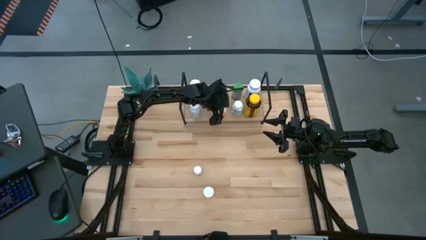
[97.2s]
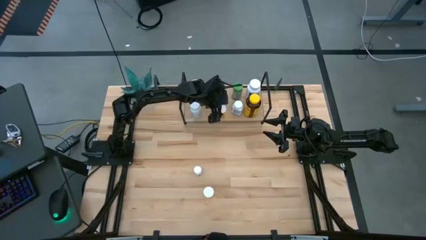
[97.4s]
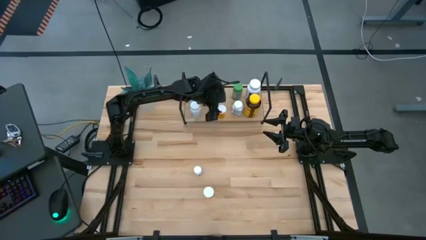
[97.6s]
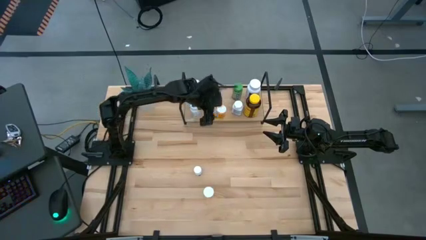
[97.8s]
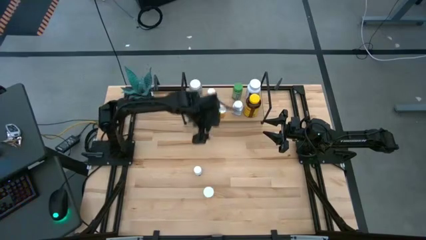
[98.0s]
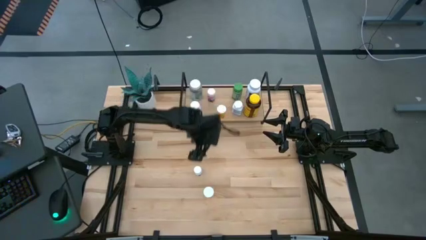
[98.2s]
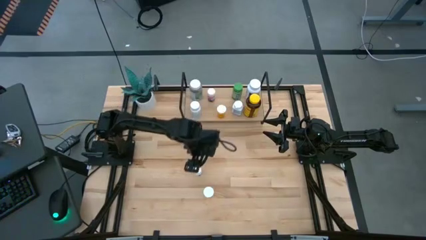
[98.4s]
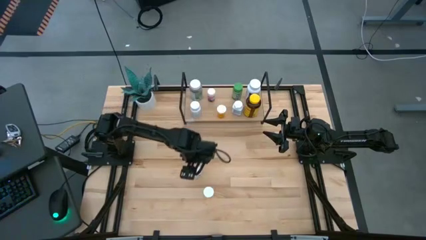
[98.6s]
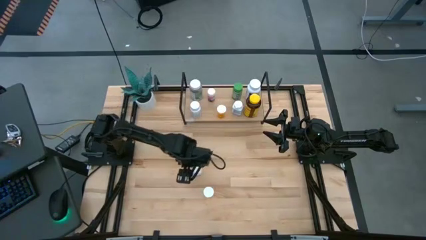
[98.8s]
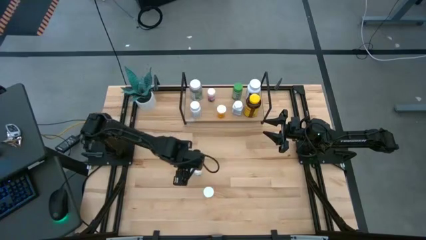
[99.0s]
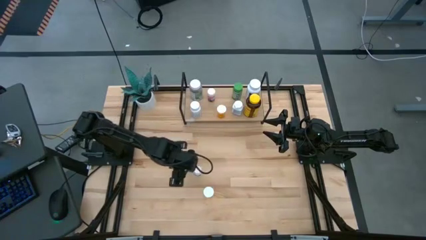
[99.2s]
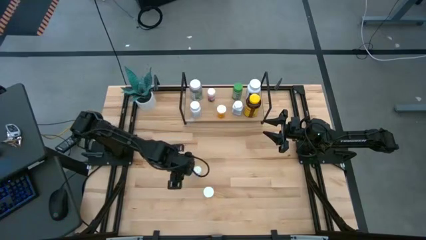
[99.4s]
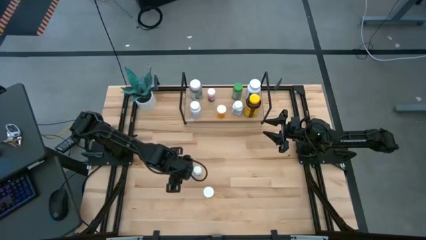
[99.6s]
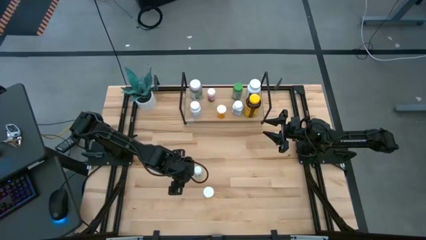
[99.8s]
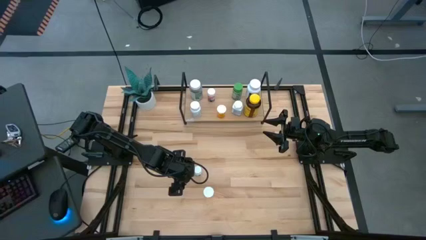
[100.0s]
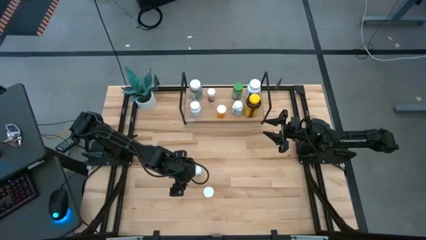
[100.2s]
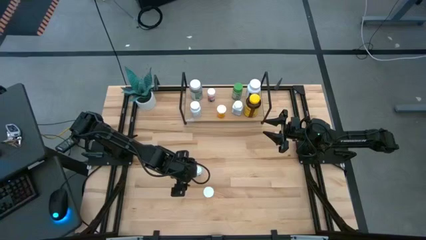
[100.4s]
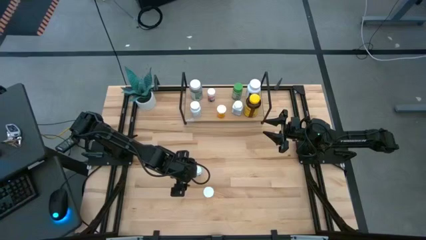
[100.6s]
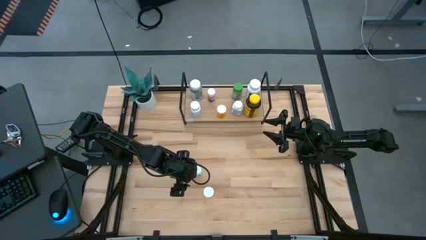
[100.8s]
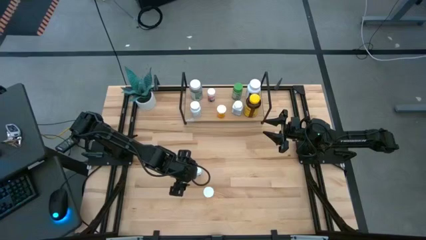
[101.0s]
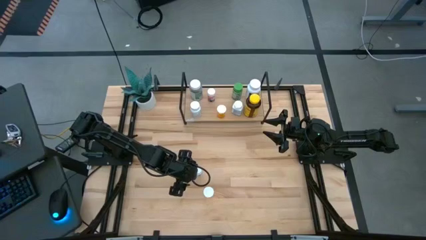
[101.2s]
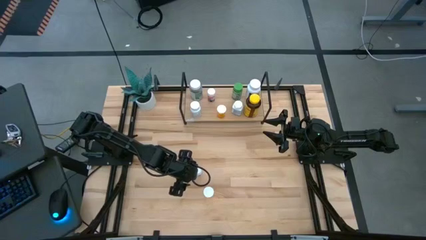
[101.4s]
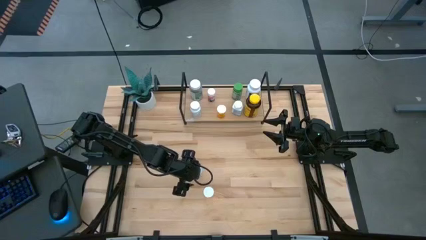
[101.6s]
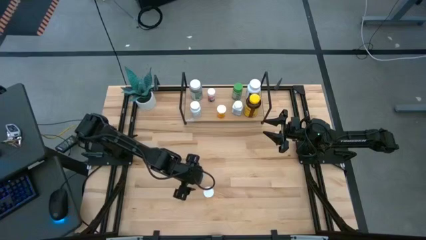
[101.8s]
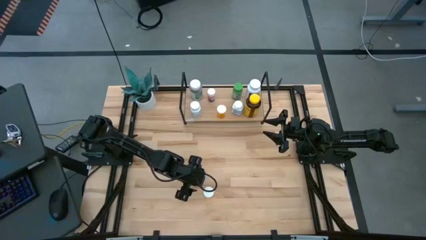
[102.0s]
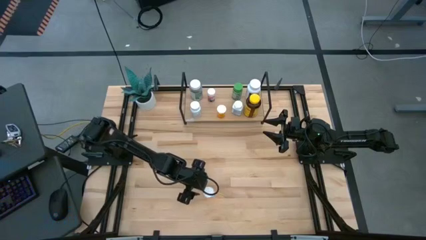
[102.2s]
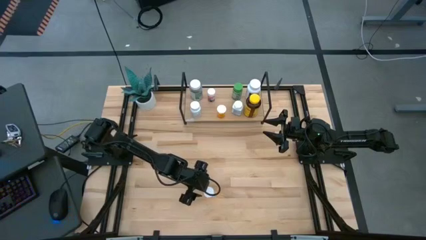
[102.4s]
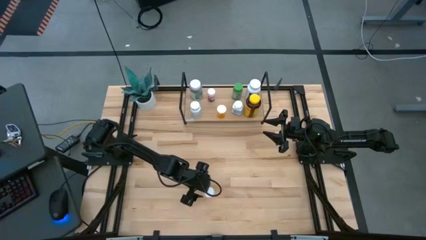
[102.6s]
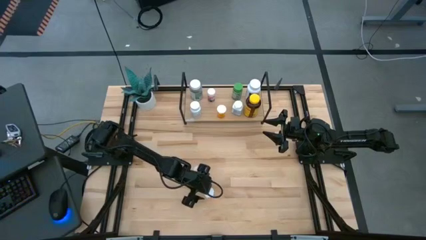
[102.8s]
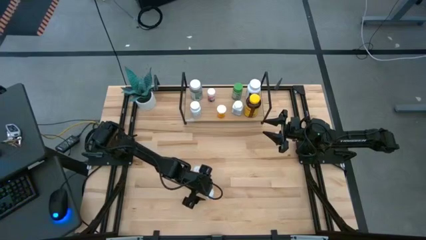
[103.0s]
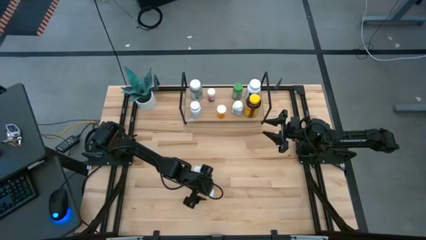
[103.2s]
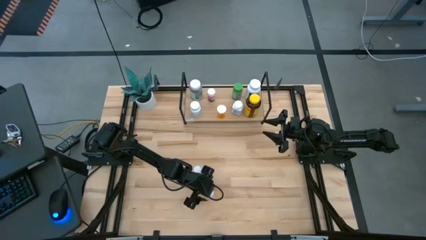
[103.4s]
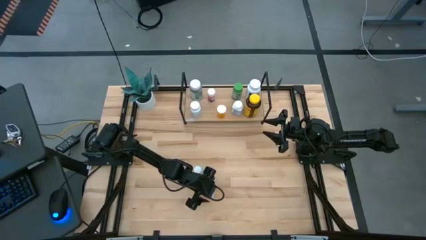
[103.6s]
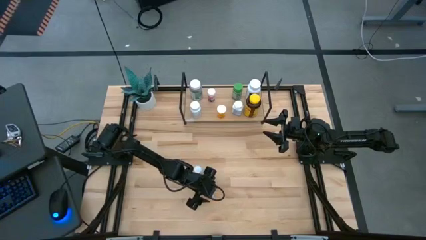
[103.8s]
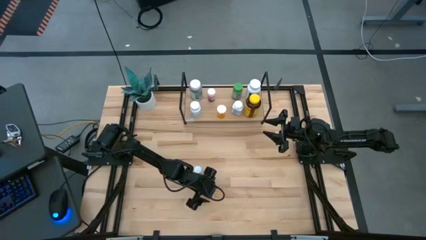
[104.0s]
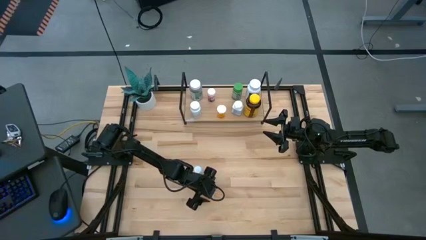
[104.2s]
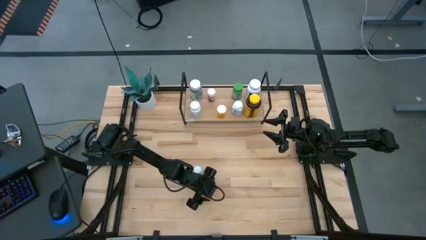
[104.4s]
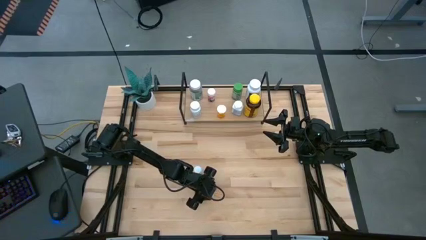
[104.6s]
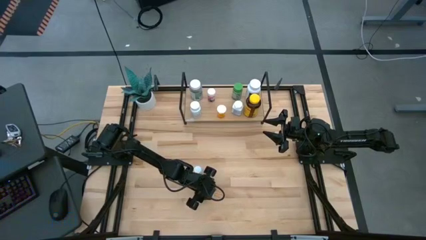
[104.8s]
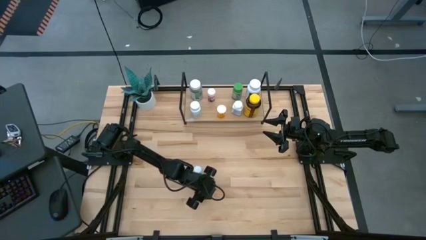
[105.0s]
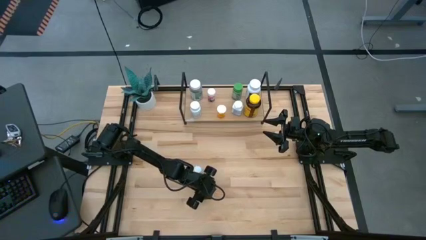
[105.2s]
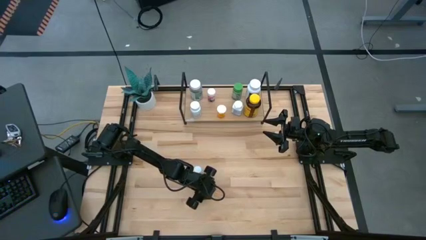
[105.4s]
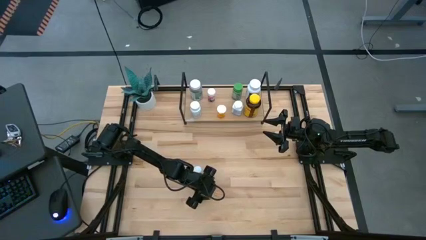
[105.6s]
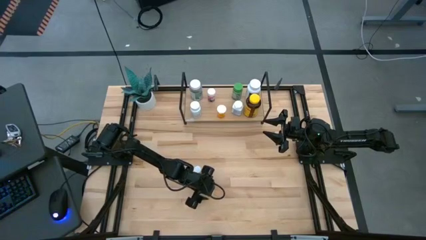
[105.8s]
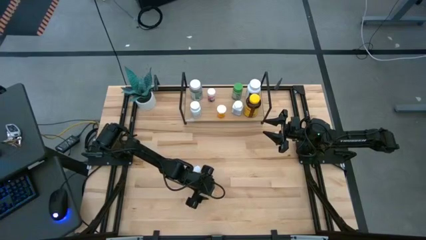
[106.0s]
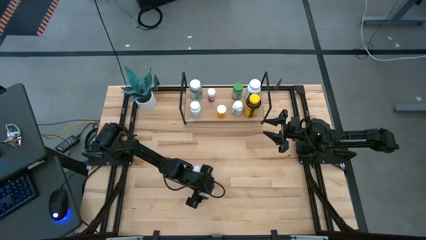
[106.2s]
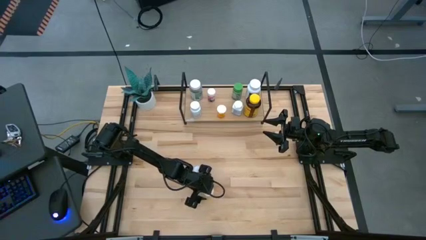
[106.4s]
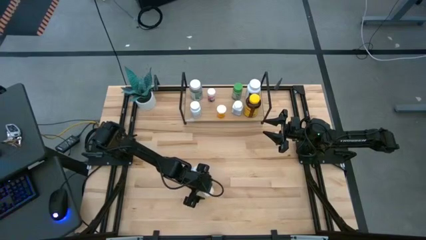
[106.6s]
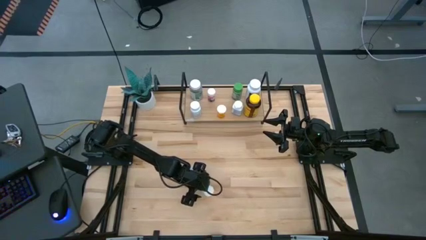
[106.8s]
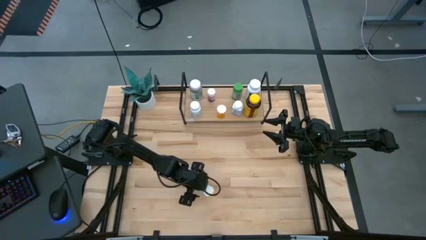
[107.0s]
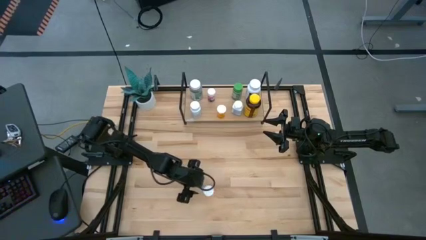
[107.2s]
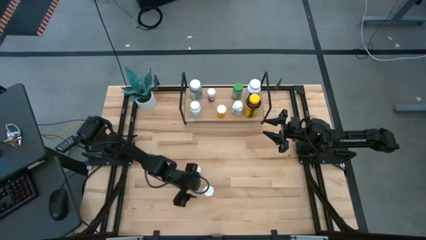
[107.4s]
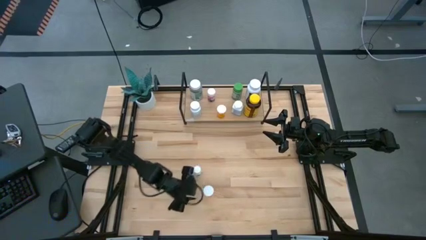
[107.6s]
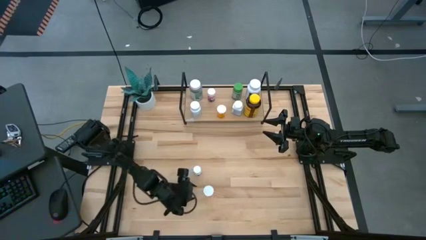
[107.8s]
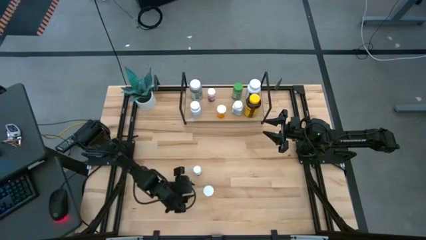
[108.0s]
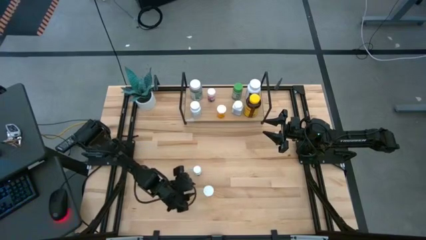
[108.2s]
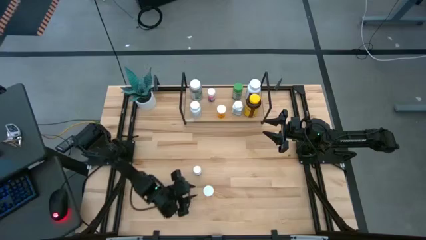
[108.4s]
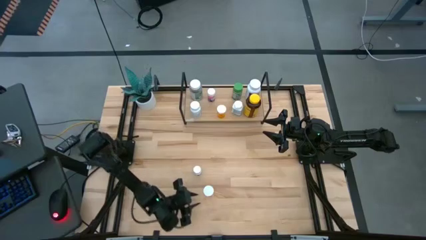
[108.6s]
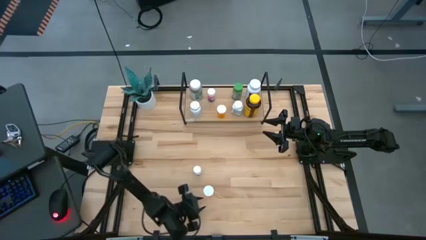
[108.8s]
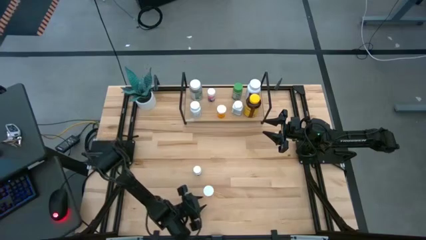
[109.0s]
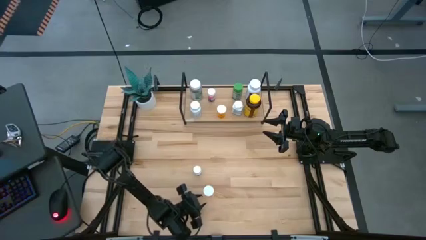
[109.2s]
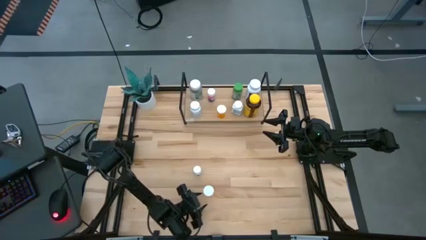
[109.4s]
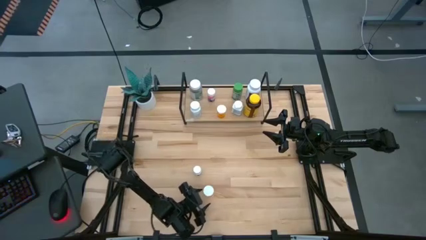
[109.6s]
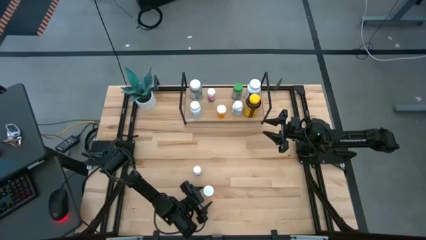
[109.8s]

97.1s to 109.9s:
Task: Pick and place medicine bottles onto shelf by color
Put the orange pill bottle on the shelf aligned with the other orange pill bottle
